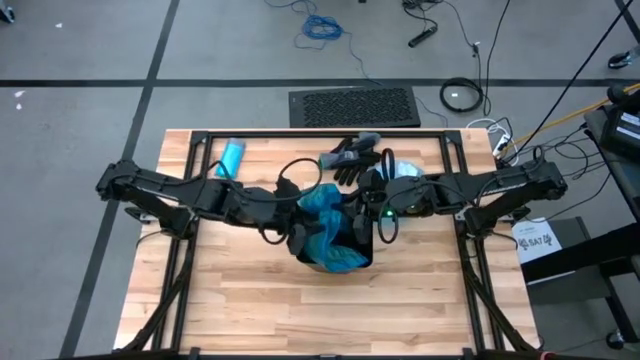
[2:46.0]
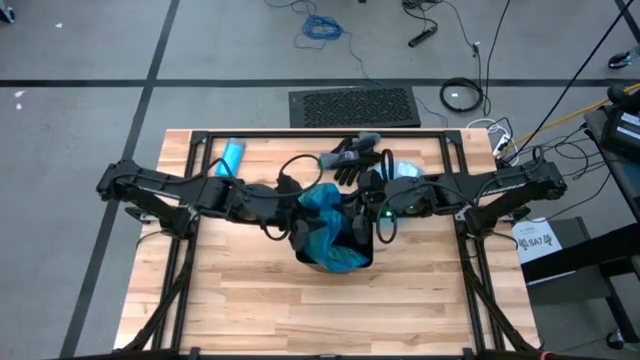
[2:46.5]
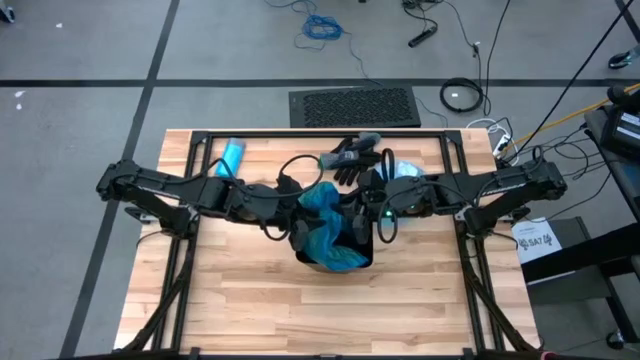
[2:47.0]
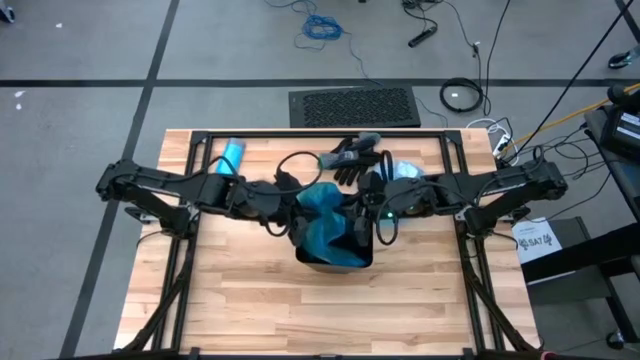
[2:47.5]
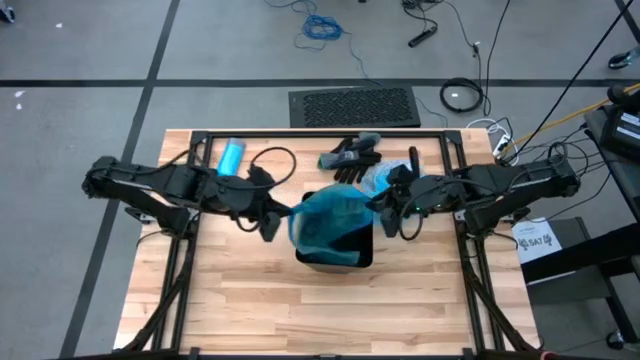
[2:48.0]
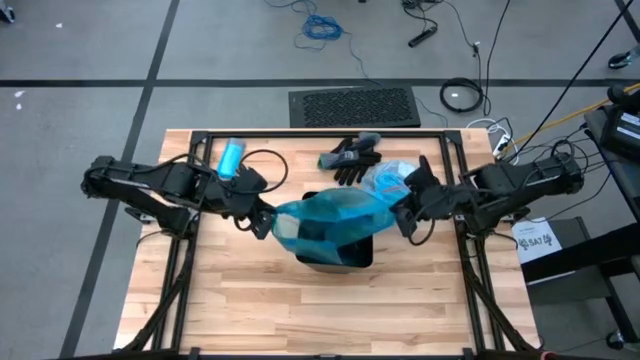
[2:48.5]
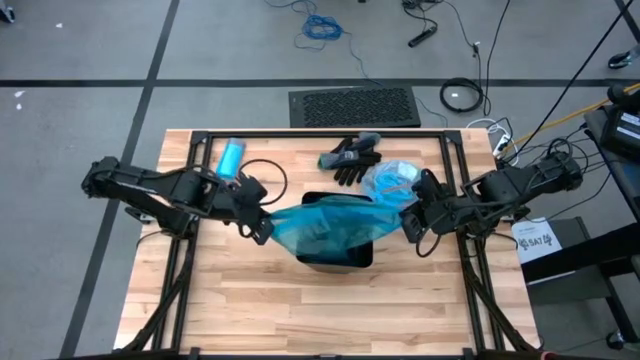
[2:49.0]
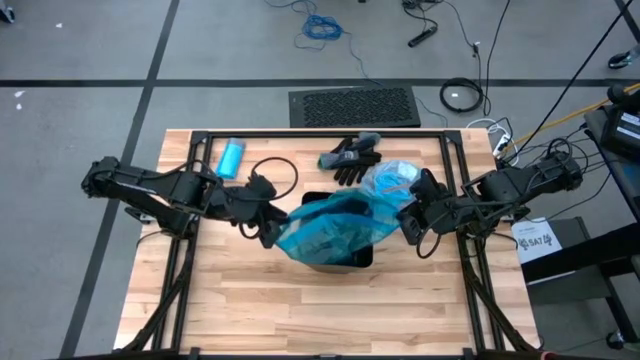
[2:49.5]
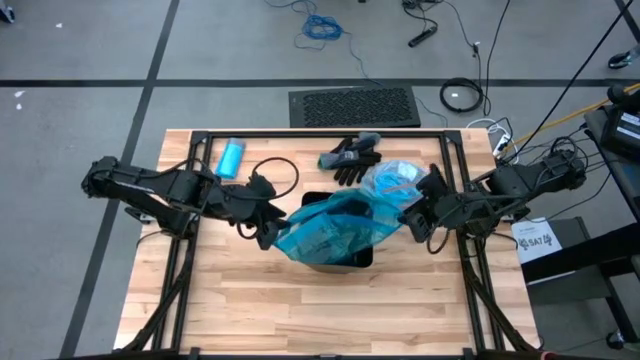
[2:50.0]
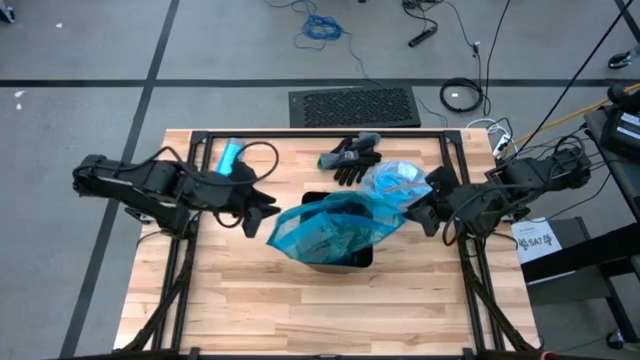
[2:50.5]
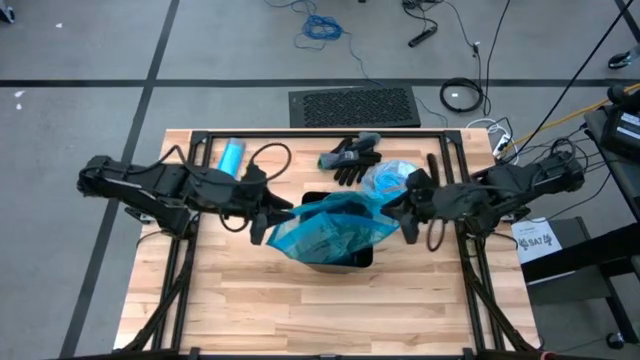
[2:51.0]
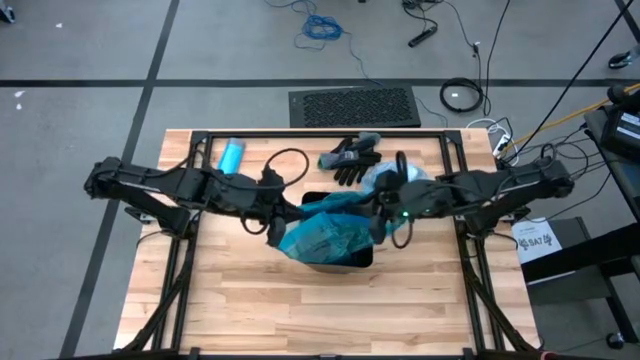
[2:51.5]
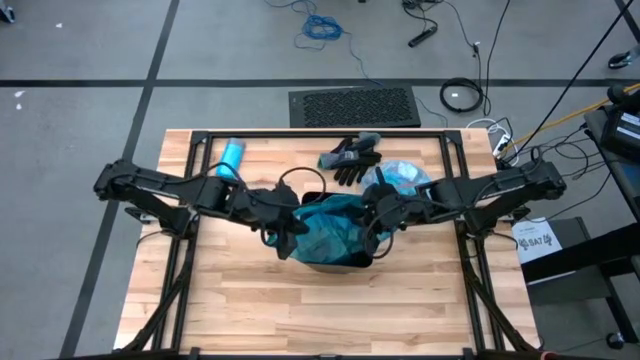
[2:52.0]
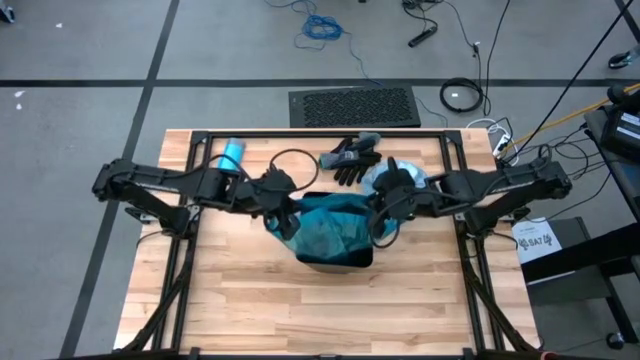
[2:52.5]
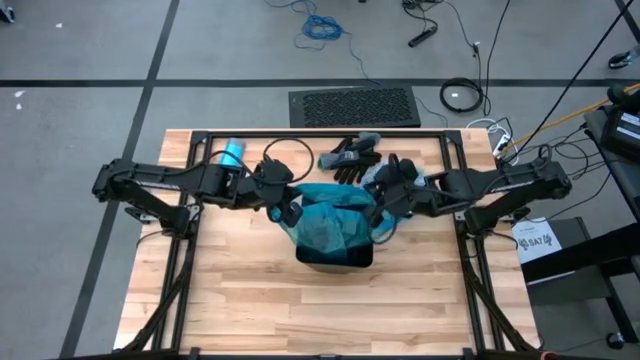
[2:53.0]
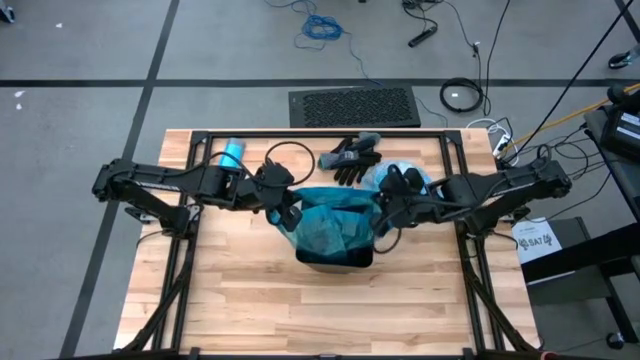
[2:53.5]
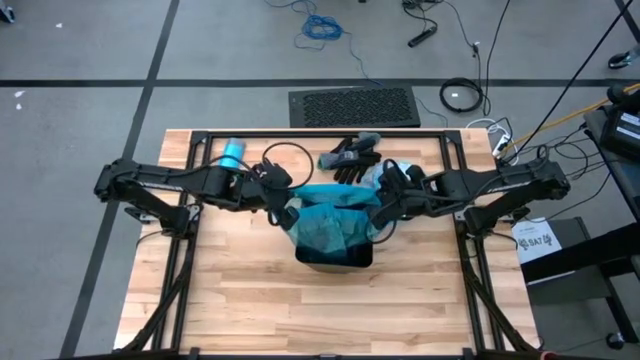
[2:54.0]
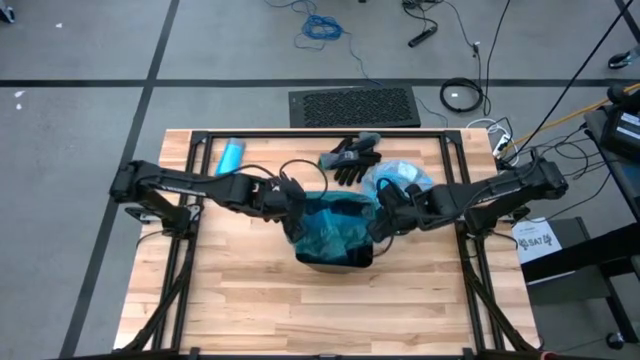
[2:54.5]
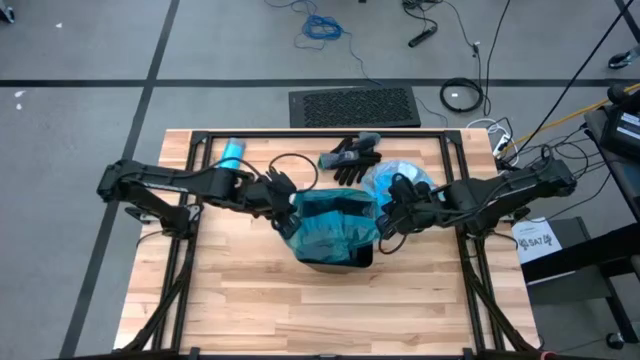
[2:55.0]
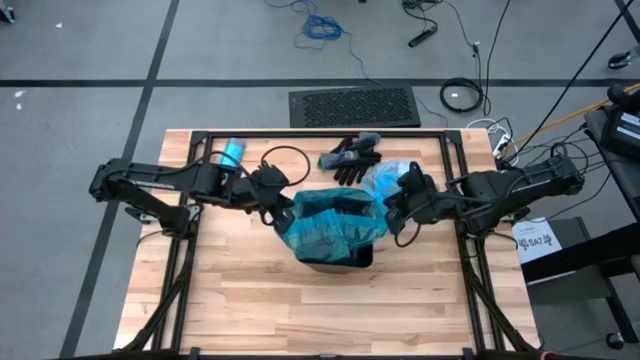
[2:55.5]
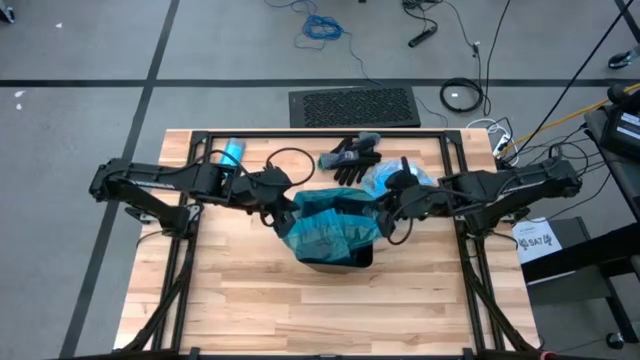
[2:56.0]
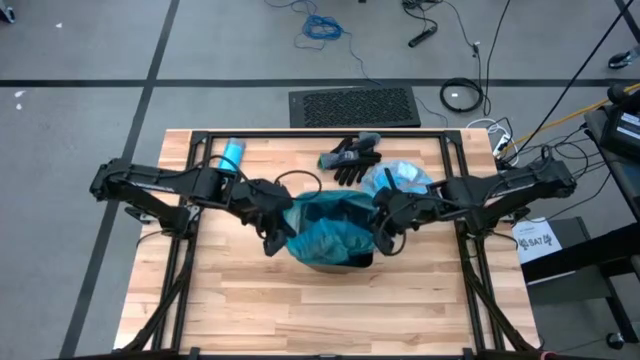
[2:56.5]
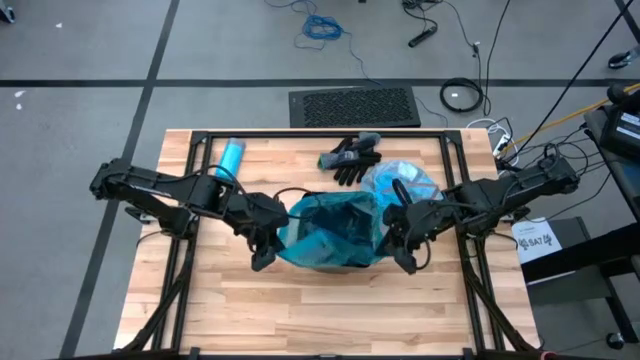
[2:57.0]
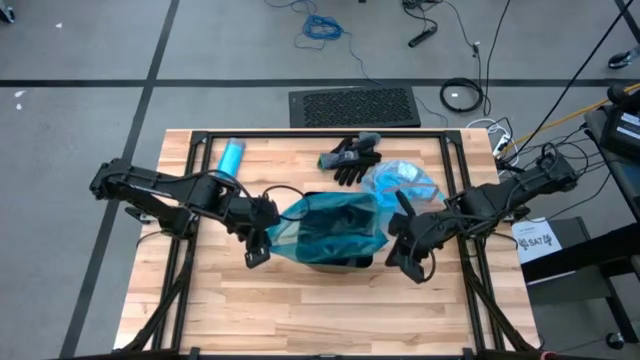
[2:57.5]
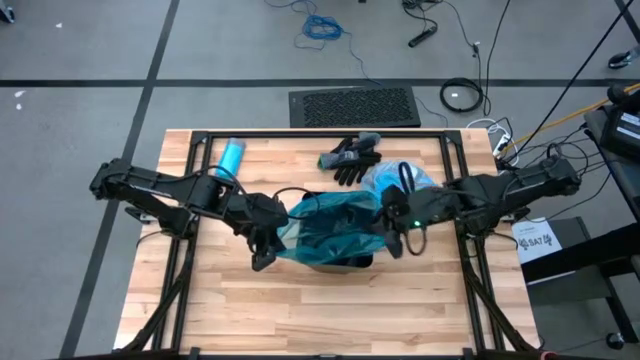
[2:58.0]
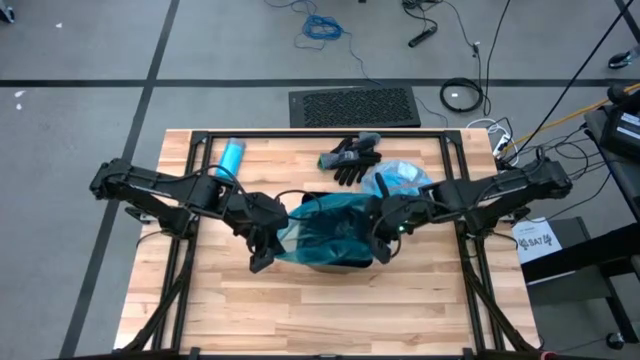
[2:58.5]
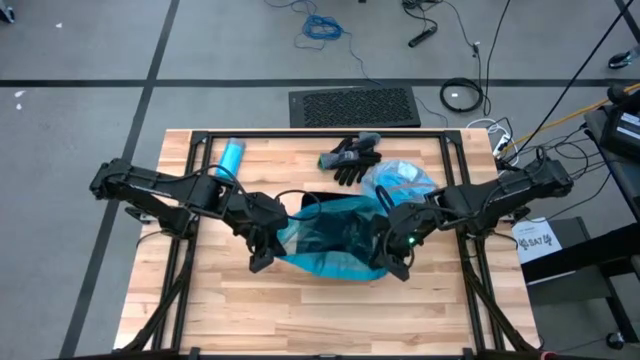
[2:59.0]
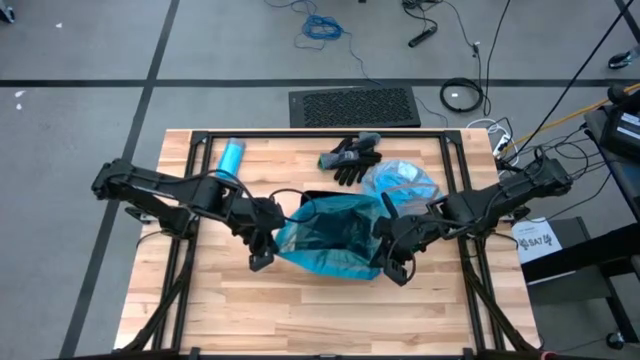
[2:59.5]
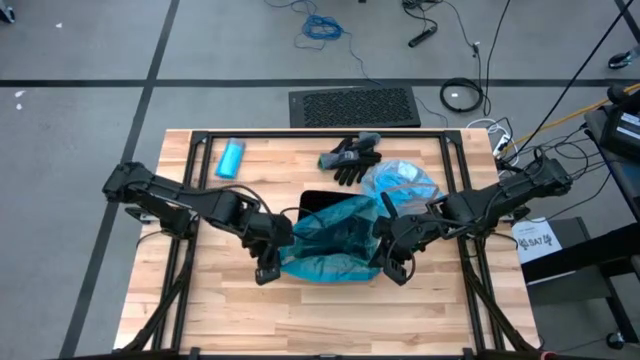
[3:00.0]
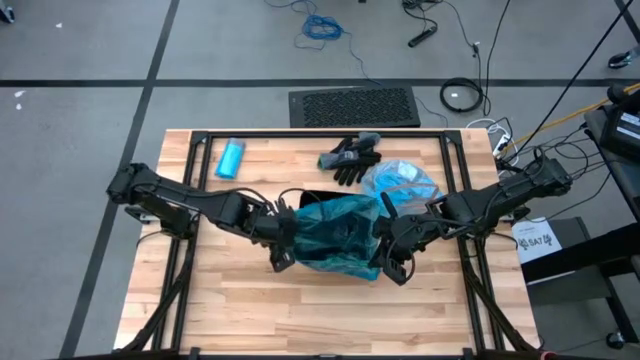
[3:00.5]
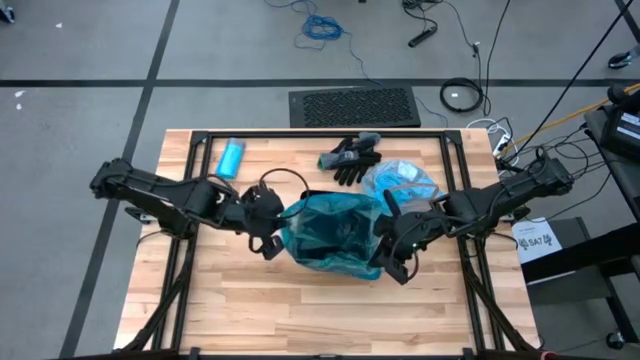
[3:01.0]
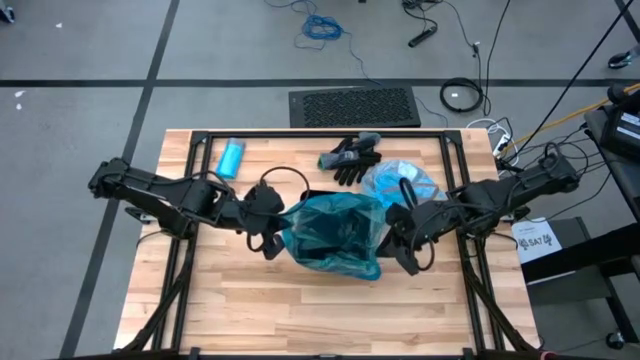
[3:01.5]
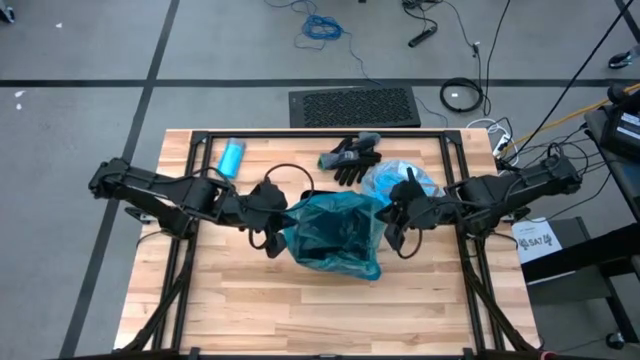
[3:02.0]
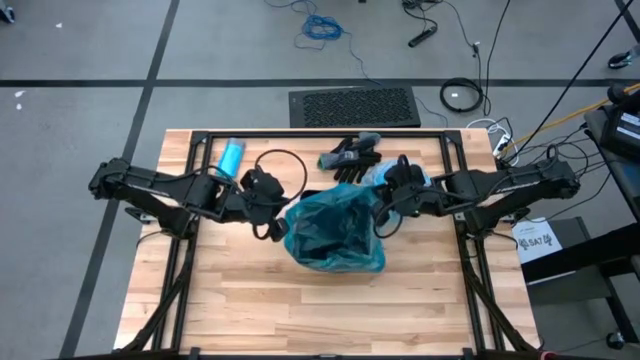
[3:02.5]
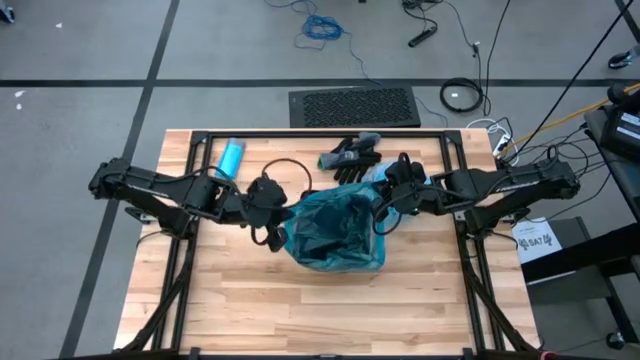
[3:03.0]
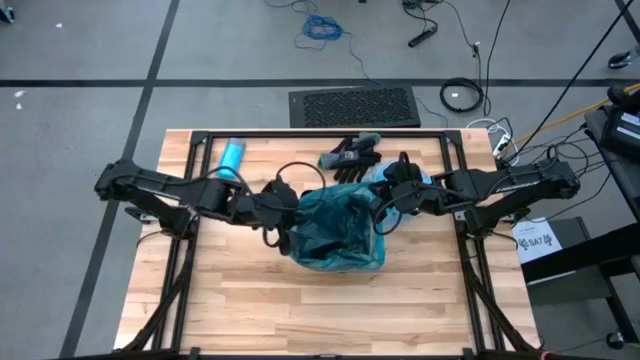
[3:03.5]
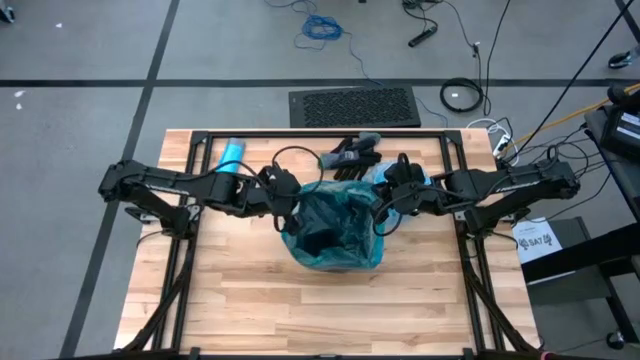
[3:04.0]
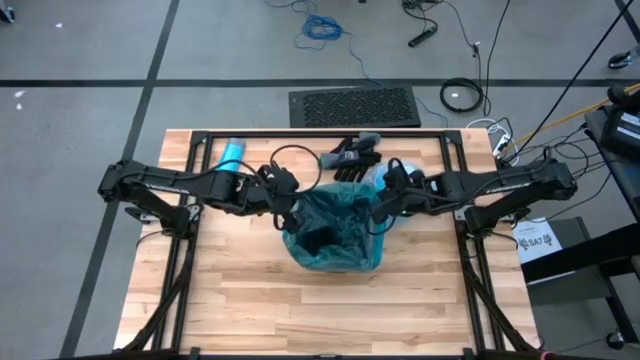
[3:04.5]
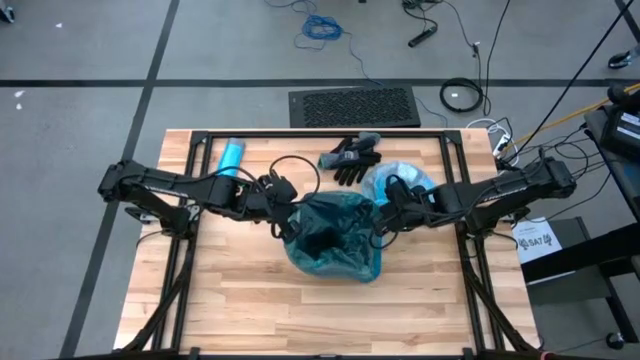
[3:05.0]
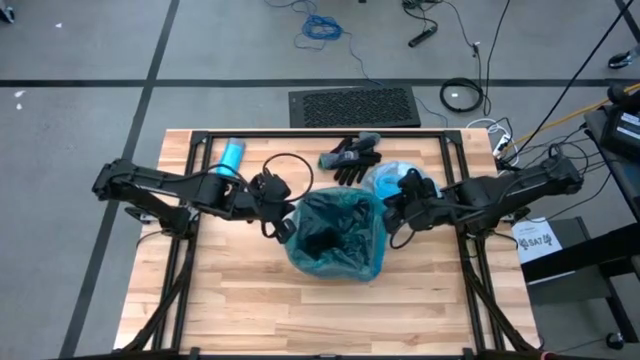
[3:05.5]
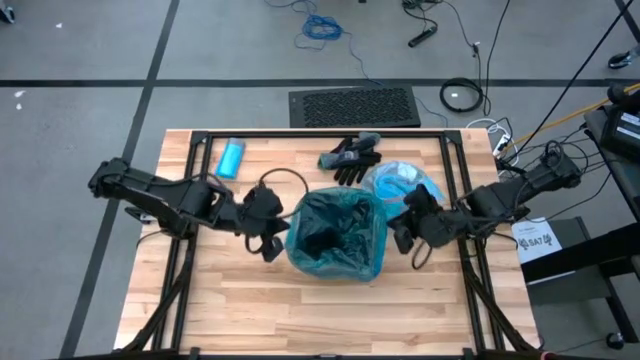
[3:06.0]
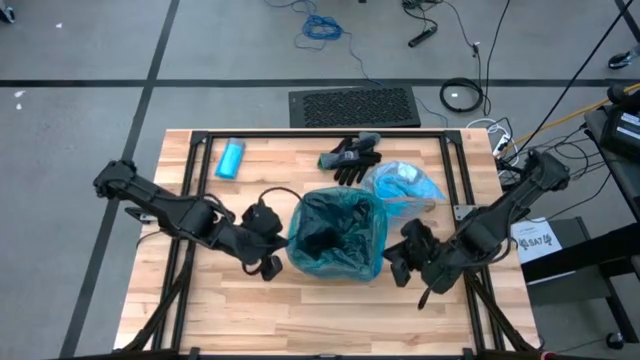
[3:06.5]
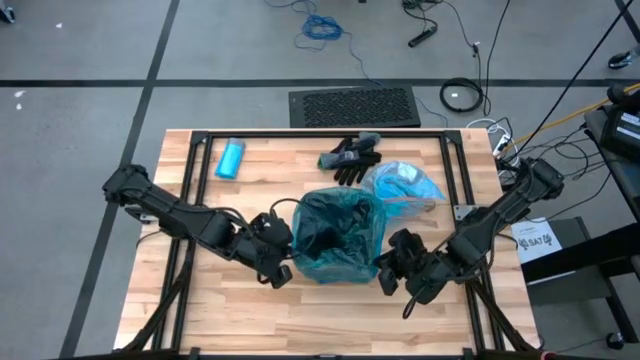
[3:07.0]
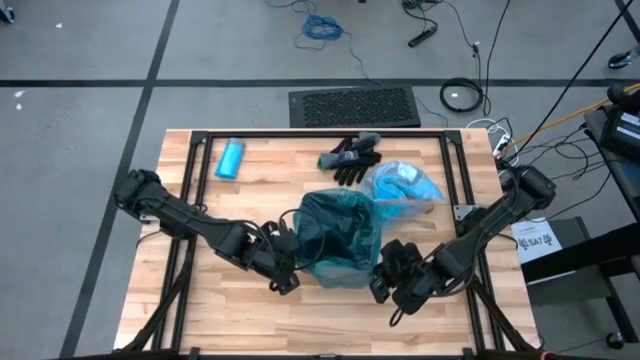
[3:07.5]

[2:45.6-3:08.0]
Task: place trash/remove bag and relplace
Put the blue trash bag into the black trash bin
